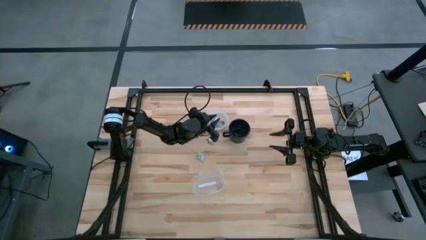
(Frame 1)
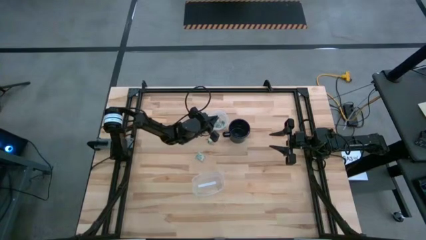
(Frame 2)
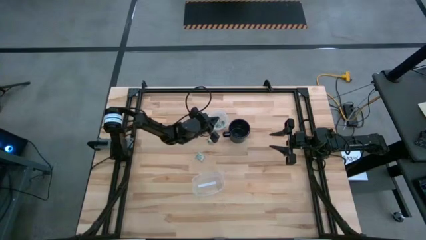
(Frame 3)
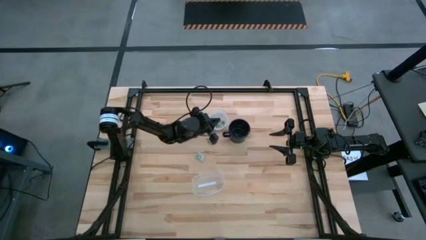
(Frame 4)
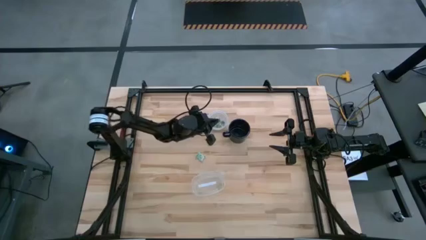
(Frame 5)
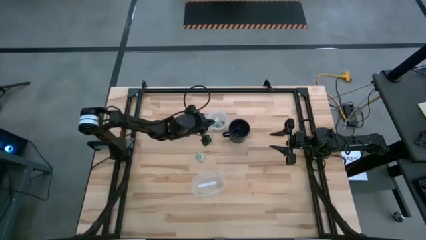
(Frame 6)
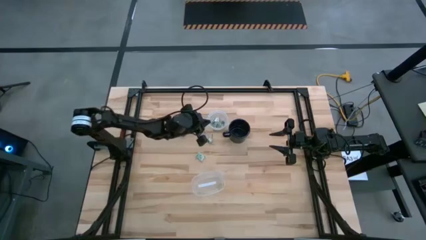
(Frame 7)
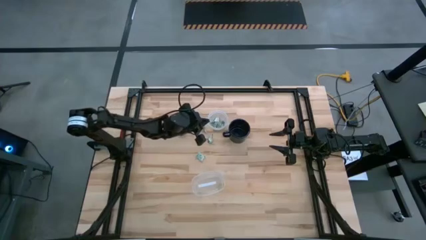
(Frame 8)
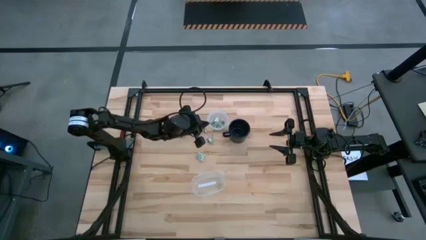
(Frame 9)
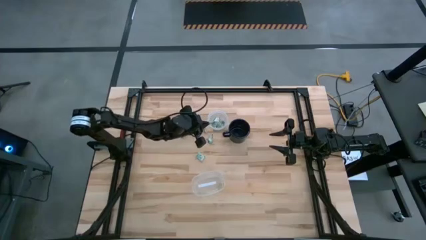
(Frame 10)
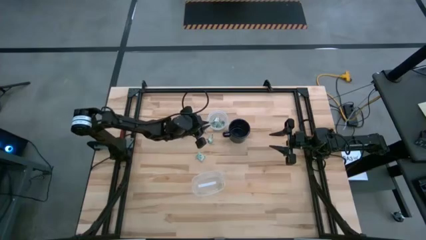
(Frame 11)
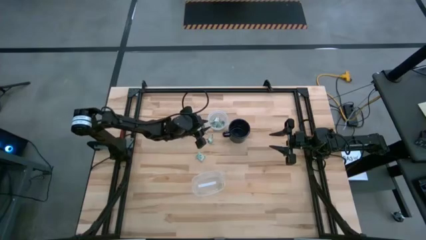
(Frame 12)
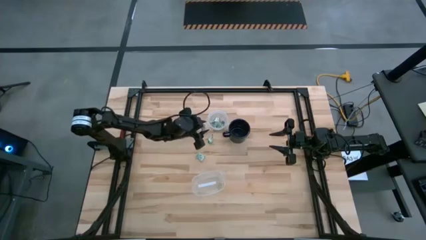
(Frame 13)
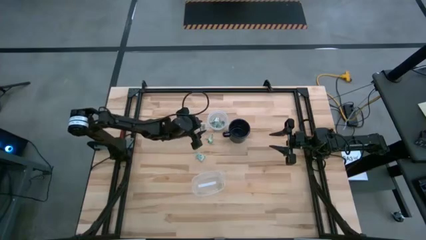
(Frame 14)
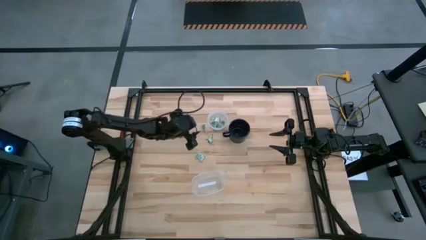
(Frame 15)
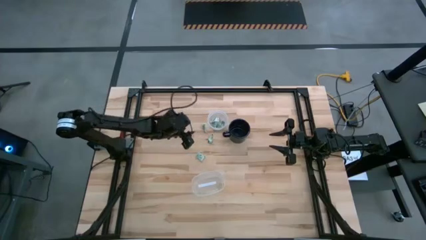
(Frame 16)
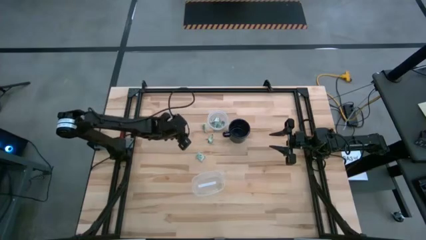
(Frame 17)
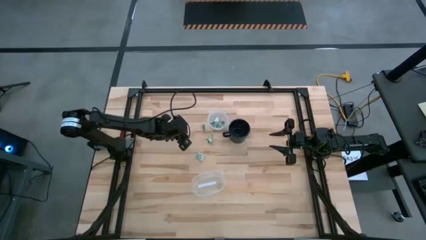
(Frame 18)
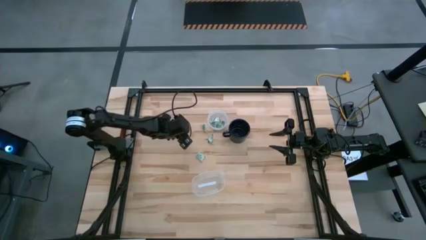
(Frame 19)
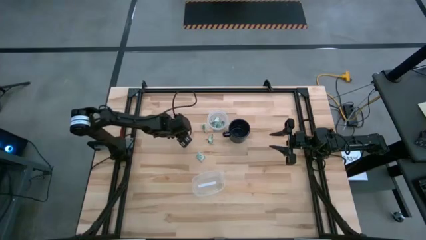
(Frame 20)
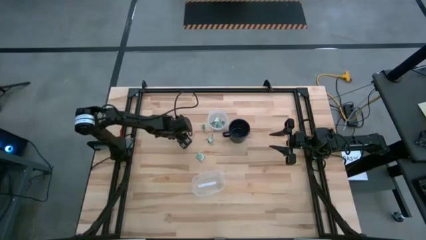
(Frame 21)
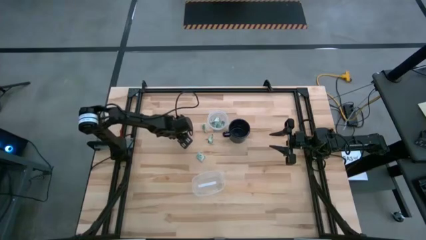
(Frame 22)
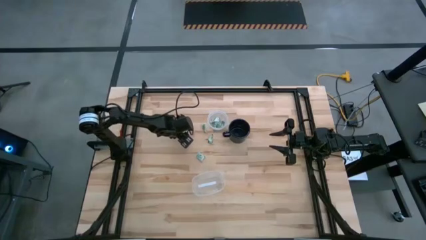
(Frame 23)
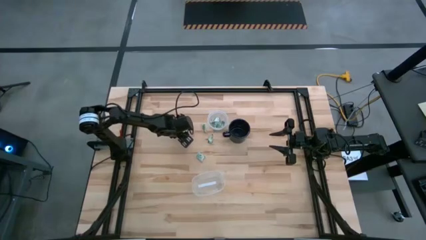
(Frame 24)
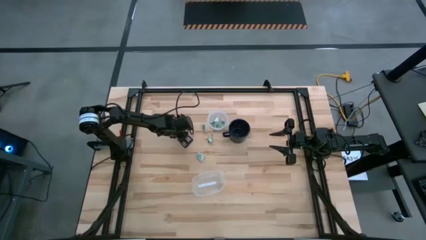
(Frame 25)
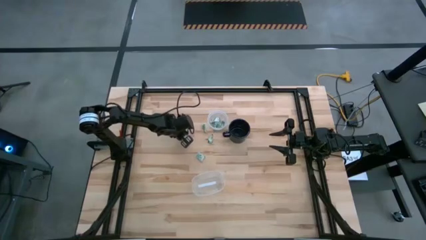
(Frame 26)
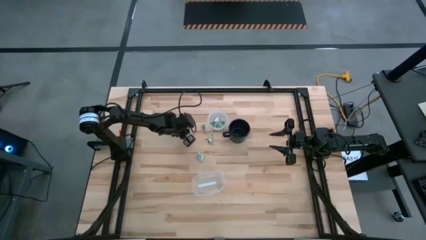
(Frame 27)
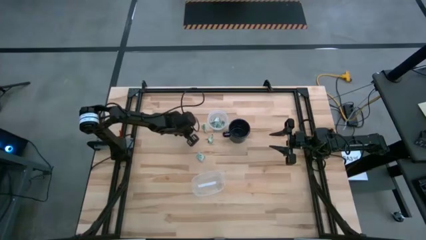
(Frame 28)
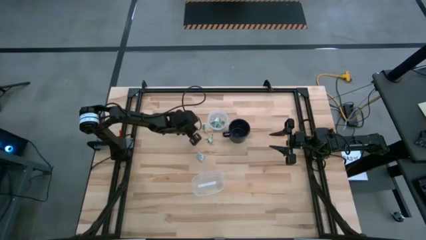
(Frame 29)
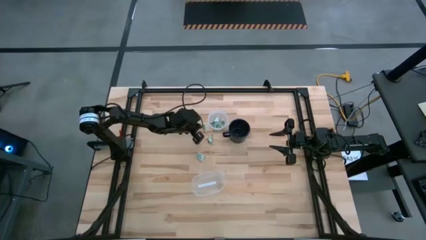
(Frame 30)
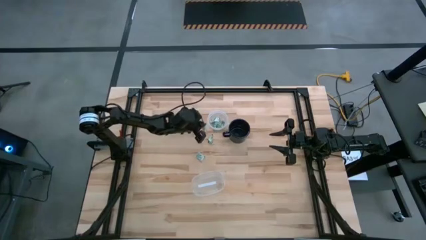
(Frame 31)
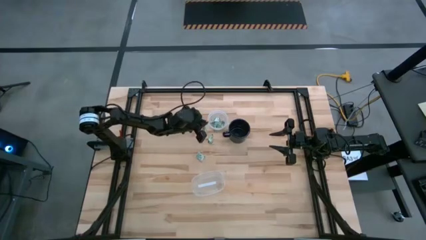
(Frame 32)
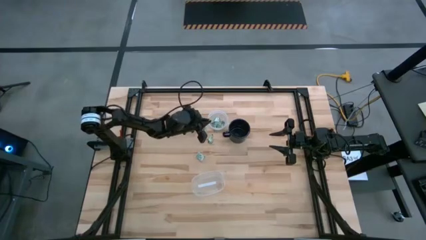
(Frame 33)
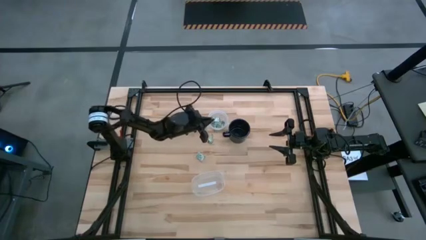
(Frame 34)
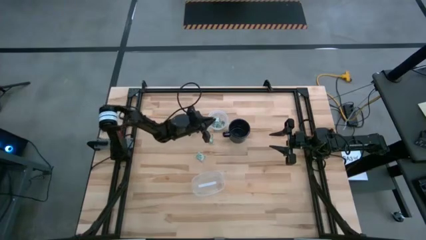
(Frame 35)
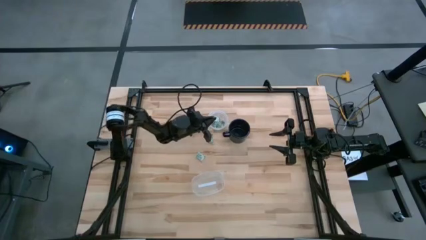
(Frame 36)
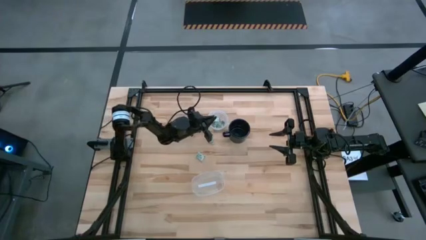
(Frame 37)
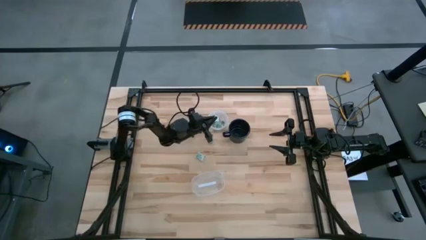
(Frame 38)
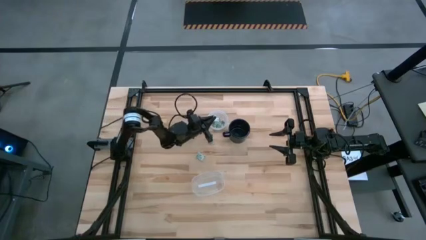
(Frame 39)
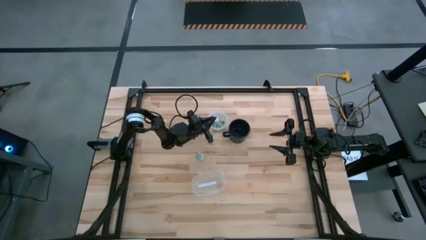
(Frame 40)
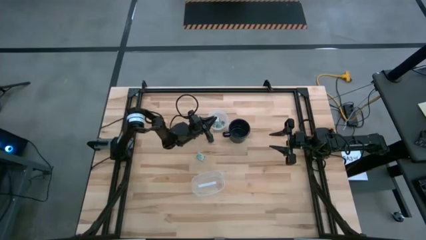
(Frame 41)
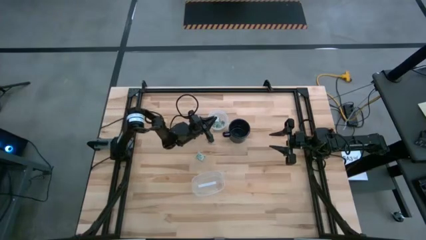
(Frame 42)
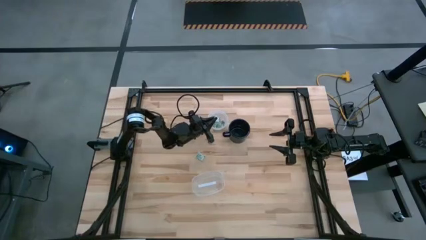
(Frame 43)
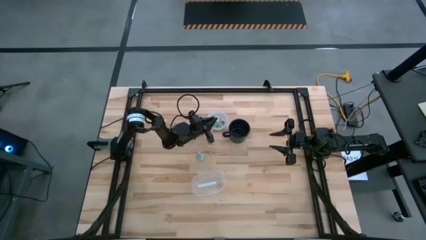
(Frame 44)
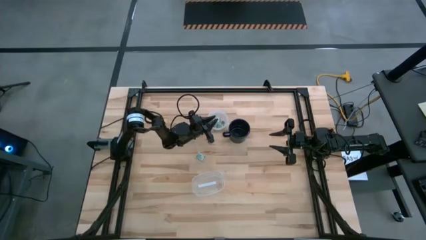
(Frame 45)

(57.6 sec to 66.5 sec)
Task: Pick and place Stevia / Truvia into bins
Put the stevia packet into the top transparent container

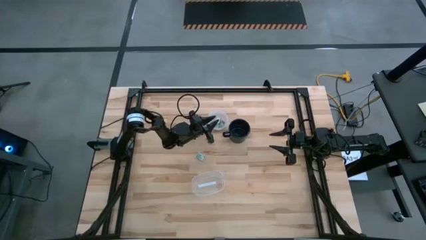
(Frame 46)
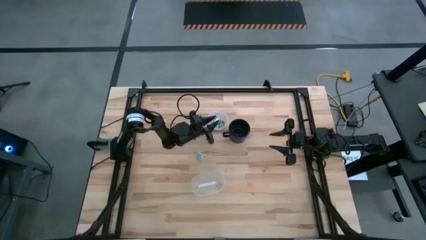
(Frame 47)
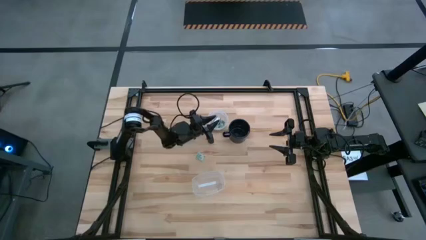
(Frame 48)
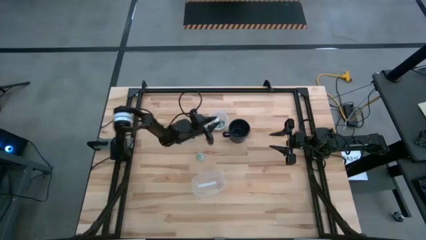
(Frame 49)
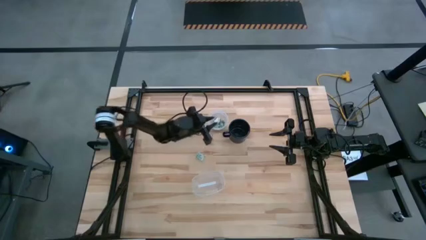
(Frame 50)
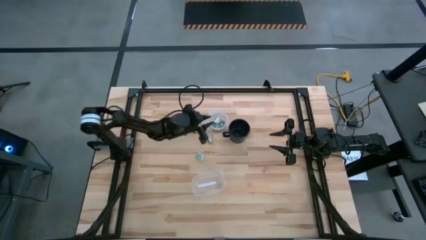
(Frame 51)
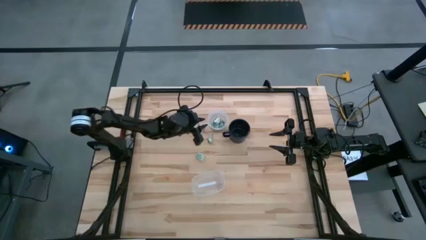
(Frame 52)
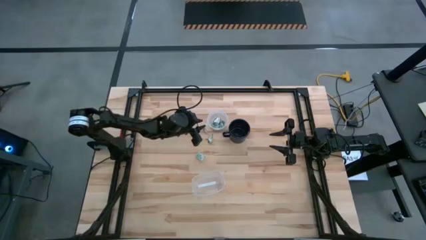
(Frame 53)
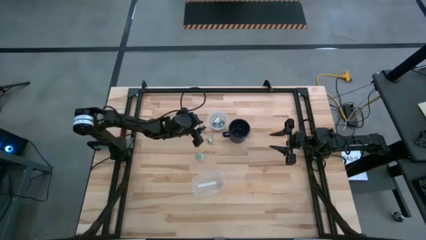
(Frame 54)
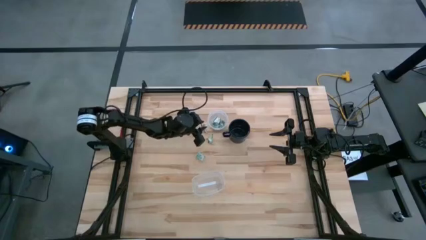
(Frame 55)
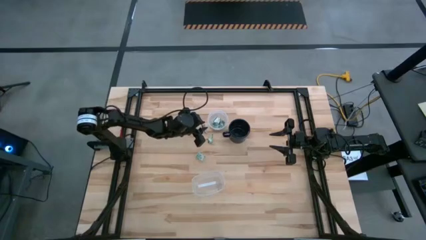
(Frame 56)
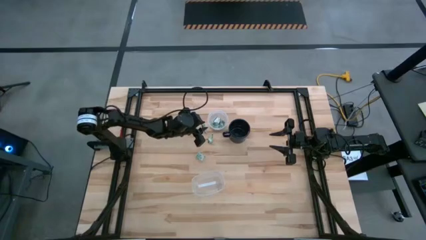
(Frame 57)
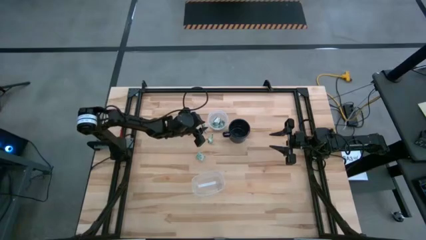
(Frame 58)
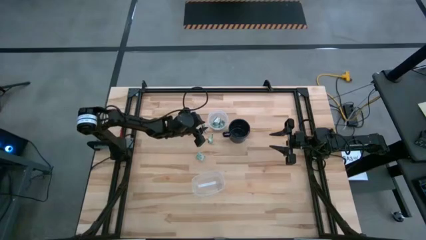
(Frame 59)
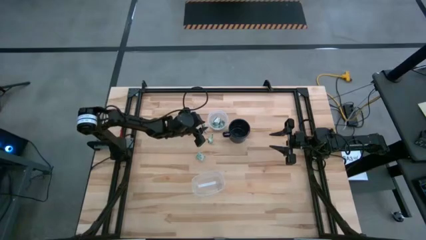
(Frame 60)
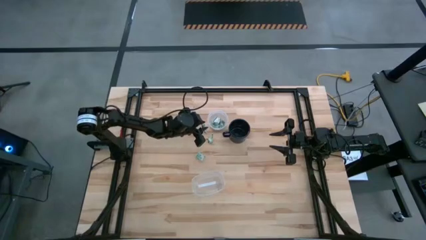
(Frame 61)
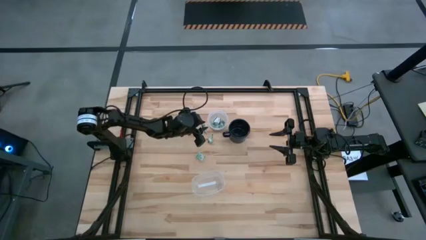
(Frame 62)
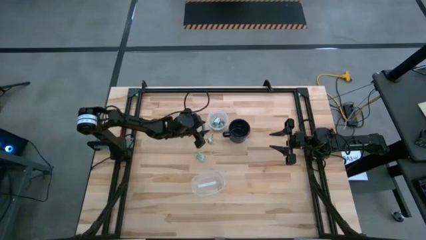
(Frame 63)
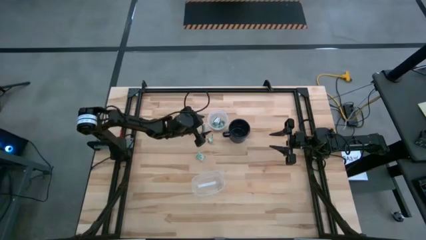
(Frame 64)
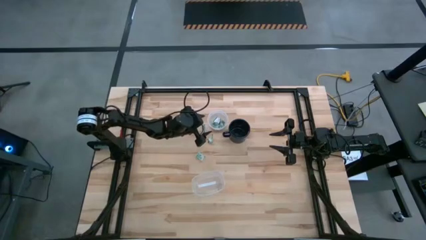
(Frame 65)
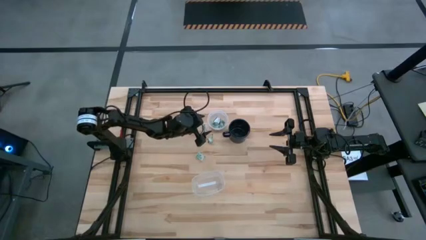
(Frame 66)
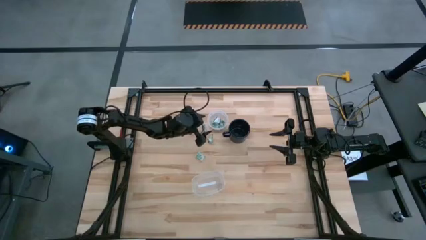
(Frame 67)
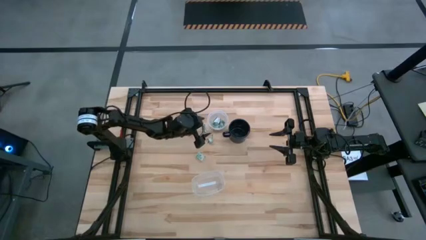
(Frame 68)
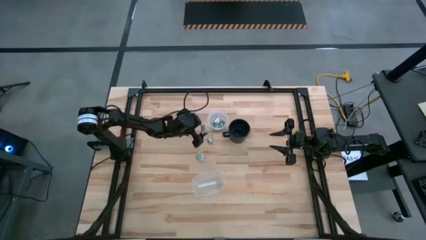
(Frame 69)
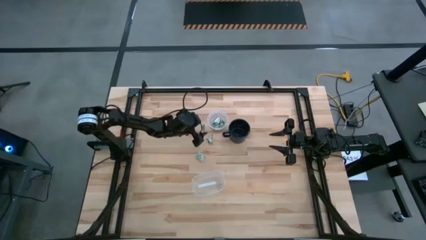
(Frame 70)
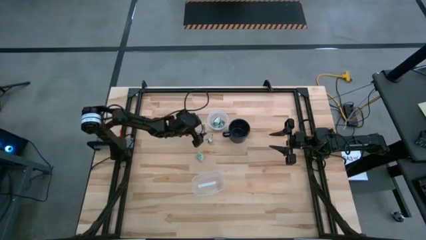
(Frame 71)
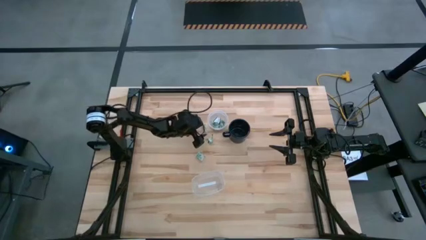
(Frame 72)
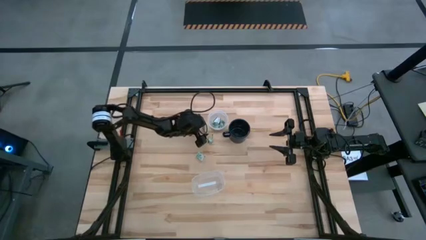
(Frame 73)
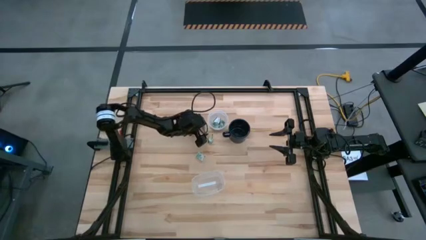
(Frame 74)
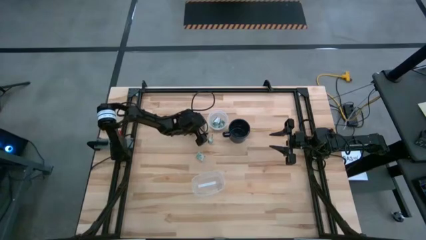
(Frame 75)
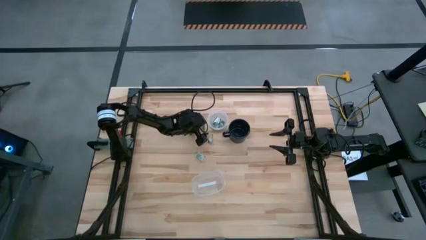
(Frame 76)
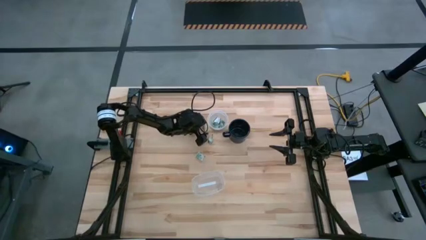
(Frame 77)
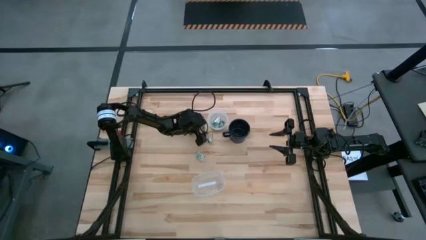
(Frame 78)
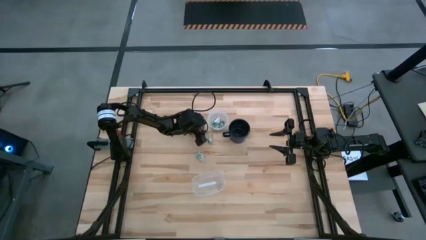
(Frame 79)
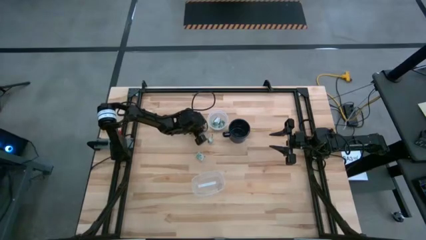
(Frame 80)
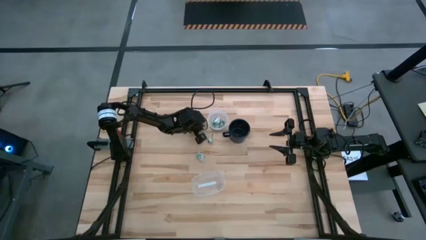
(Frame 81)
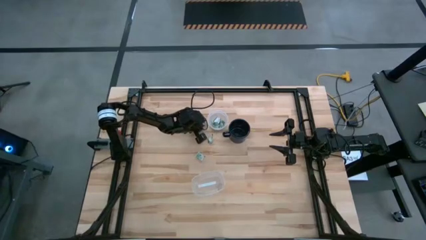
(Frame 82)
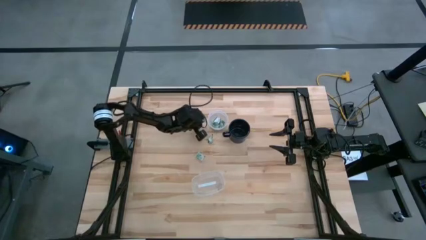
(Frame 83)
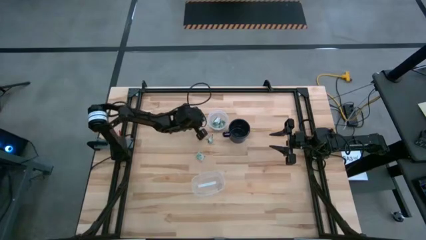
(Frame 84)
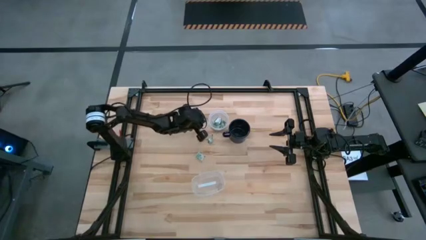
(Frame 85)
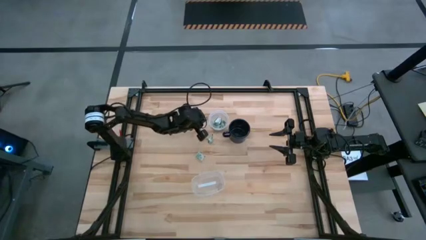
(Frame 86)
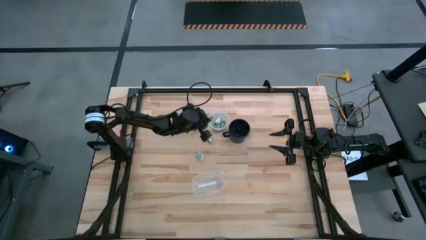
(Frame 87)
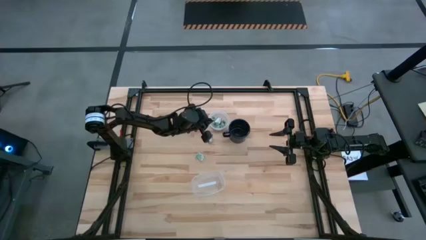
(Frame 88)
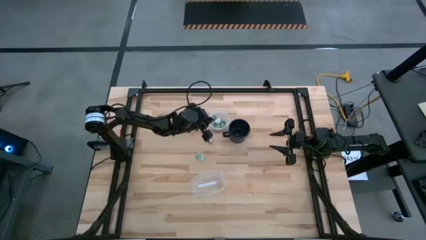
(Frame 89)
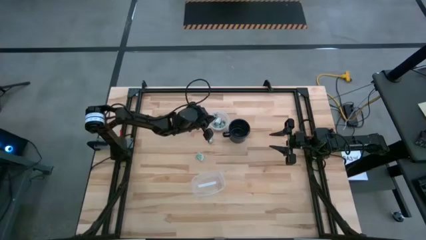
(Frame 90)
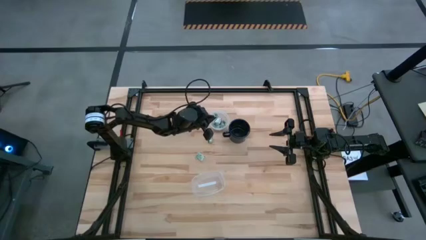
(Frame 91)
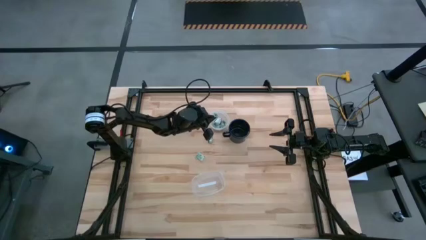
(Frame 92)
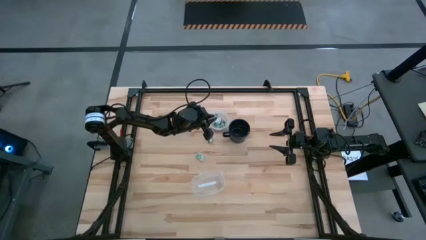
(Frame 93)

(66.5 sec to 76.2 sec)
Put the stevia packet into the top transparent container
